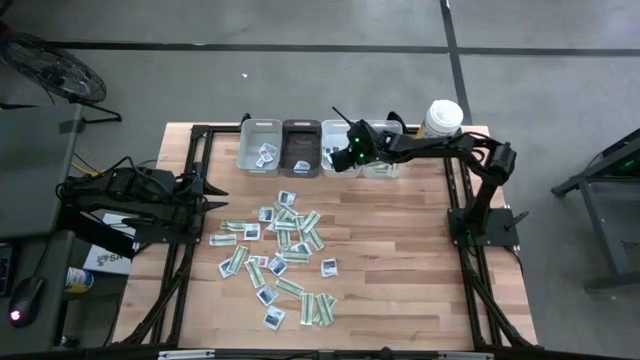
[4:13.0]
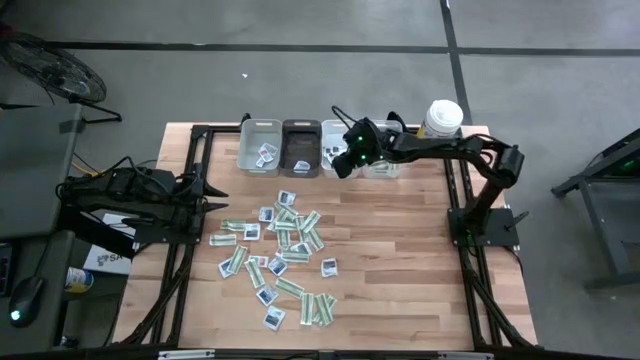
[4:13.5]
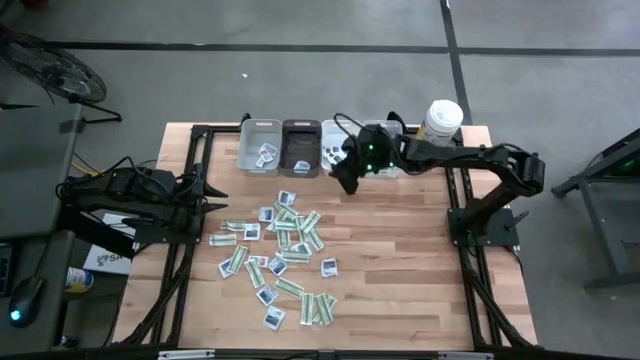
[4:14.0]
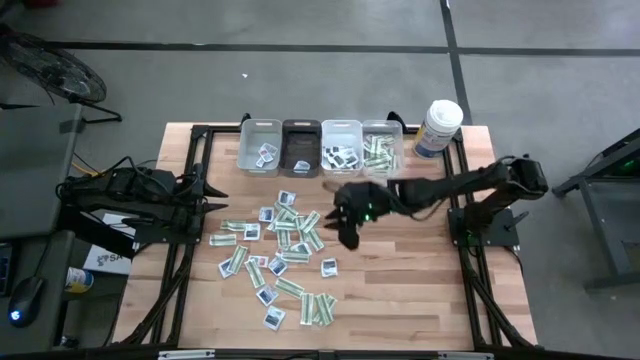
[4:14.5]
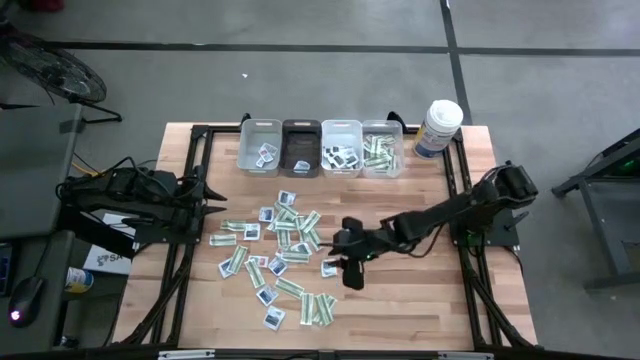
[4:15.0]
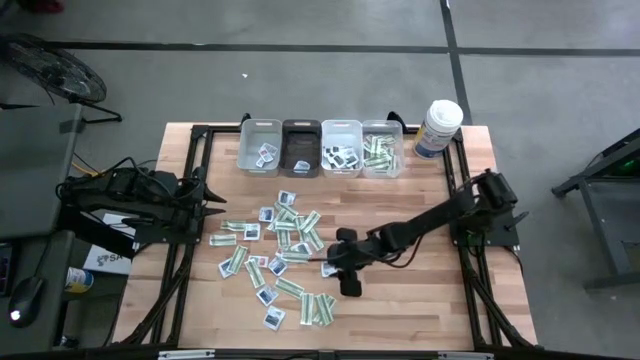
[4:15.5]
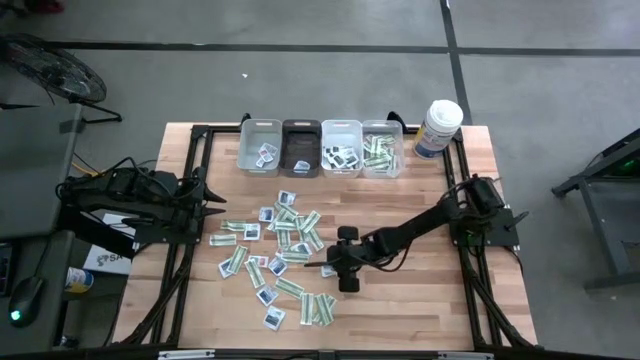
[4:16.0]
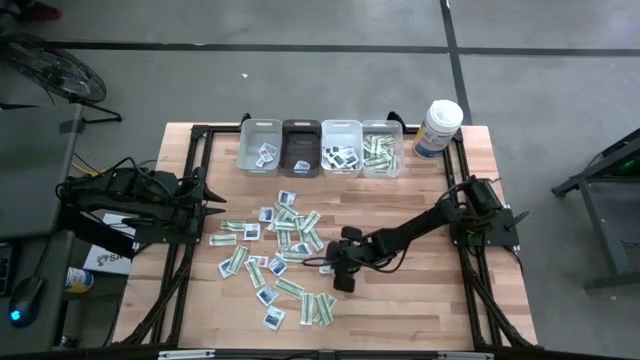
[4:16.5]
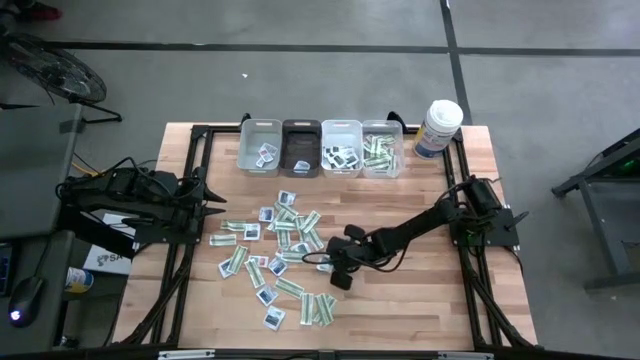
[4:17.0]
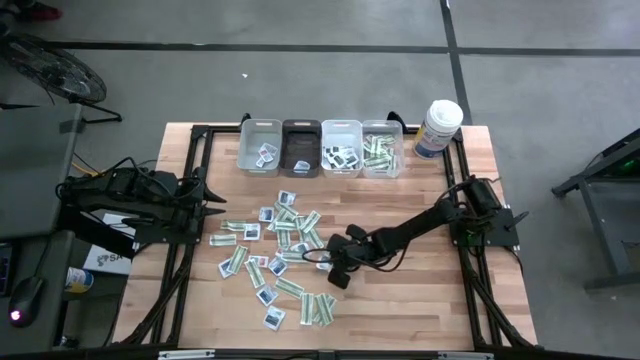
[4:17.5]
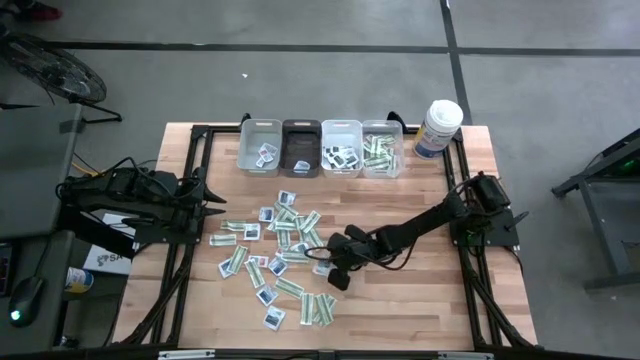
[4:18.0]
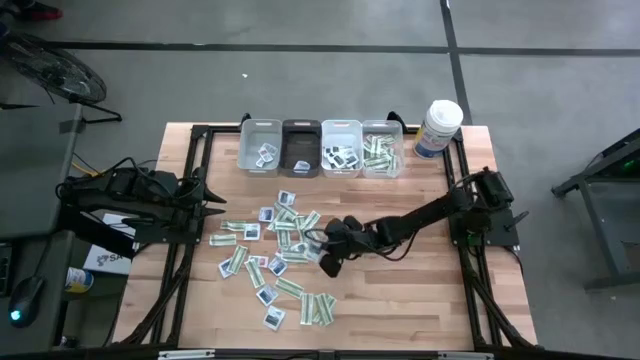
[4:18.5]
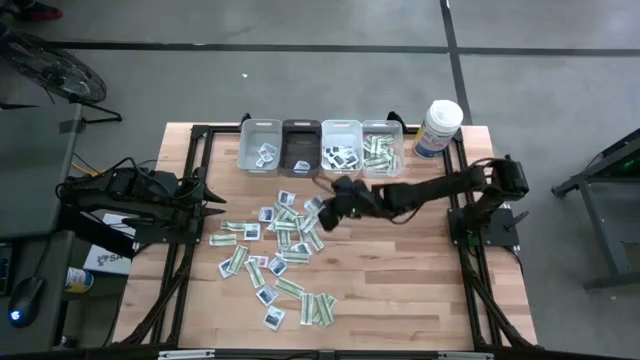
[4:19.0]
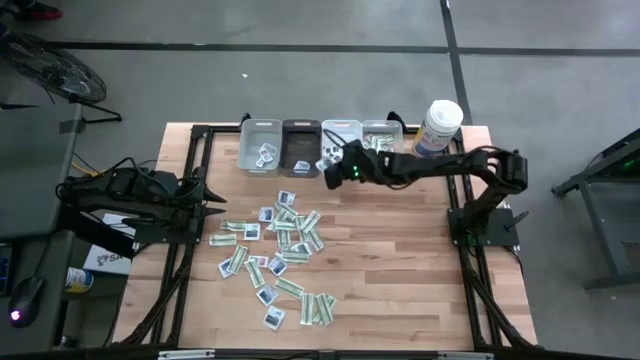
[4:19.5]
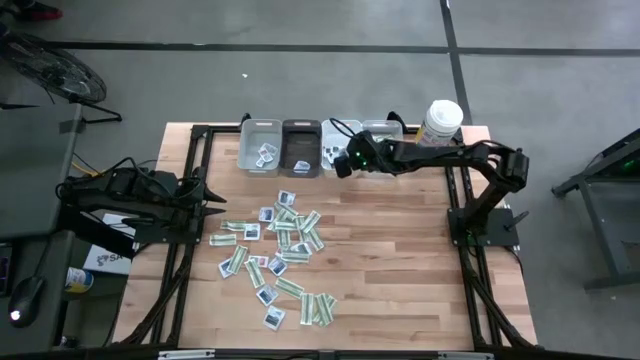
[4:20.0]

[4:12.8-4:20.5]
Task: Pick & Place First Aid Supplies
Put the black towelette pack into the white bin

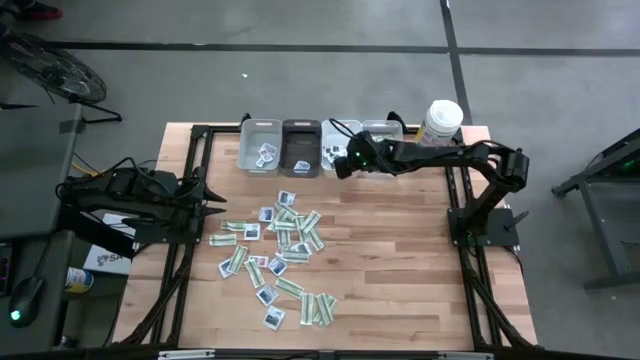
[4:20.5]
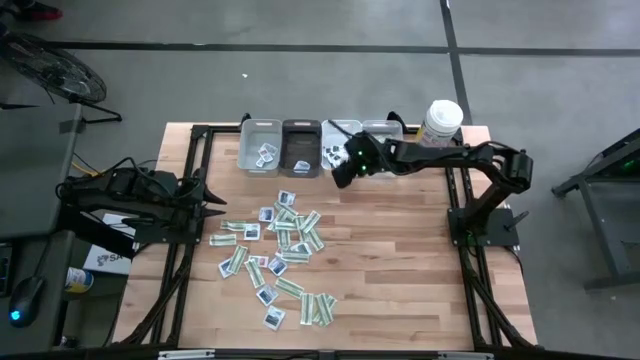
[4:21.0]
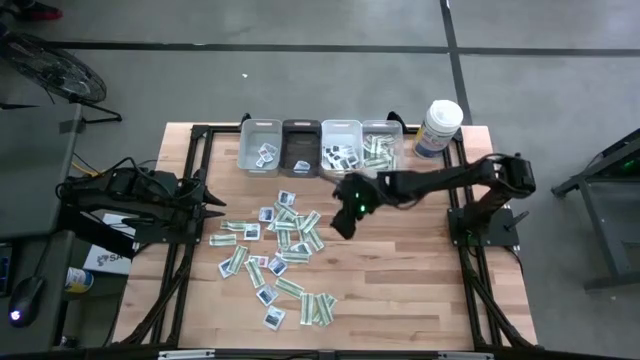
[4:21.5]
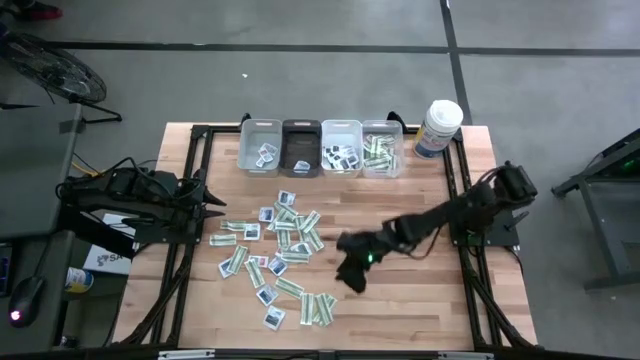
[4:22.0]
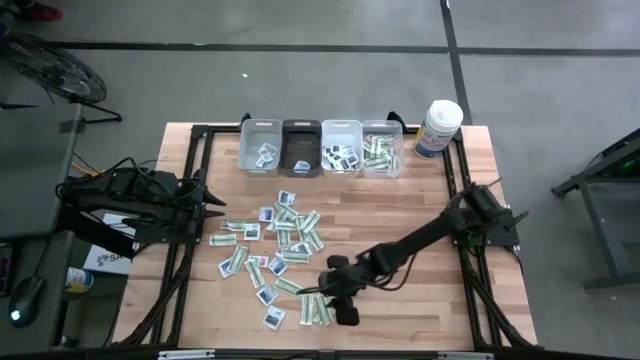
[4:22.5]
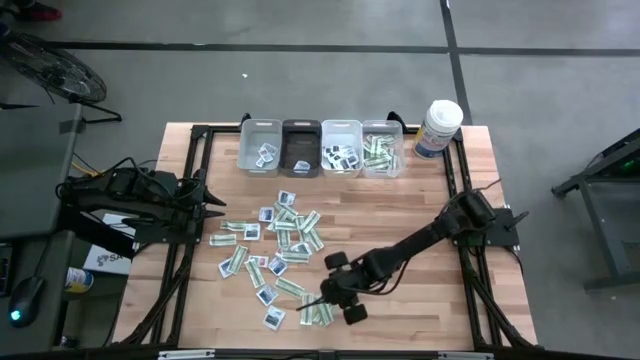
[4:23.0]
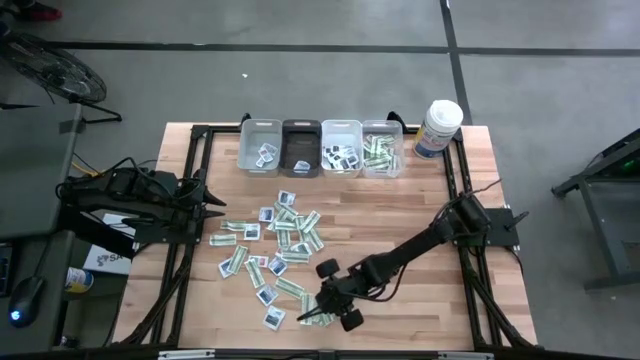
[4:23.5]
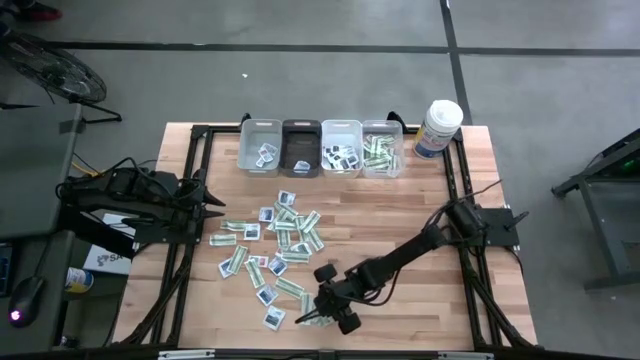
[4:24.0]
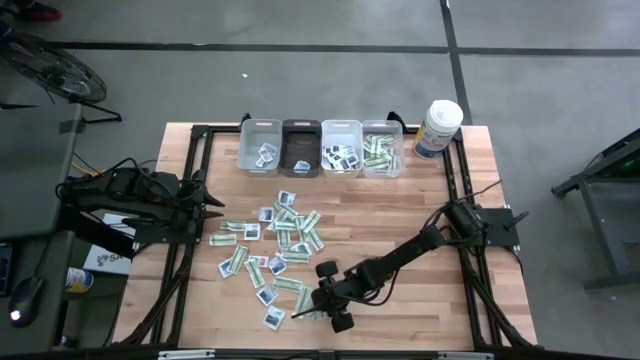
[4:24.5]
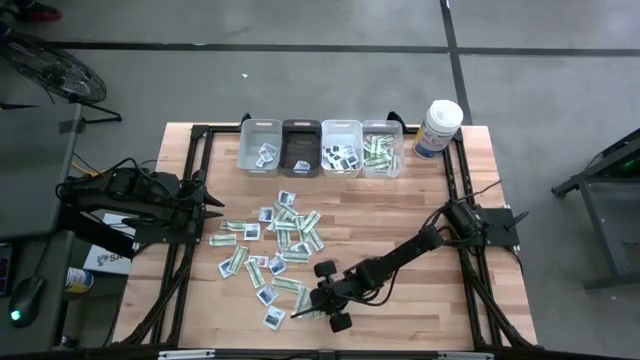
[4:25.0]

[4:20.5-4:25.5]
Put the green bandage into the transparent bin

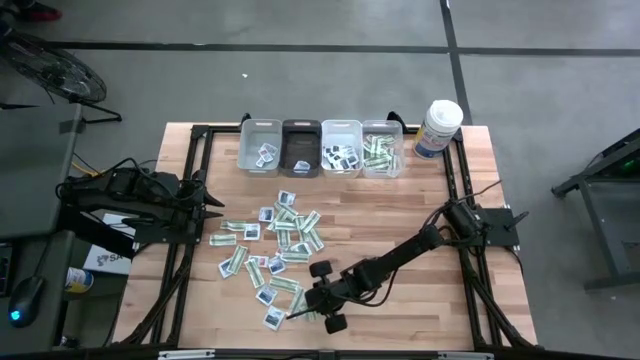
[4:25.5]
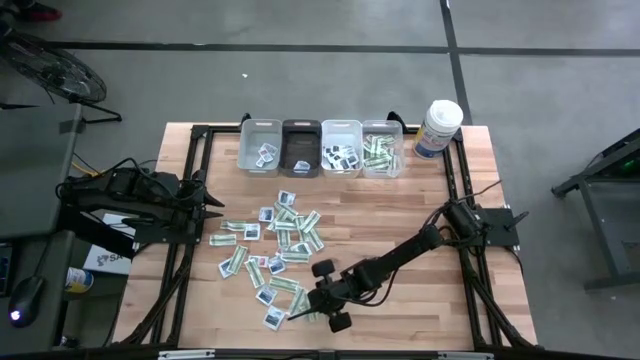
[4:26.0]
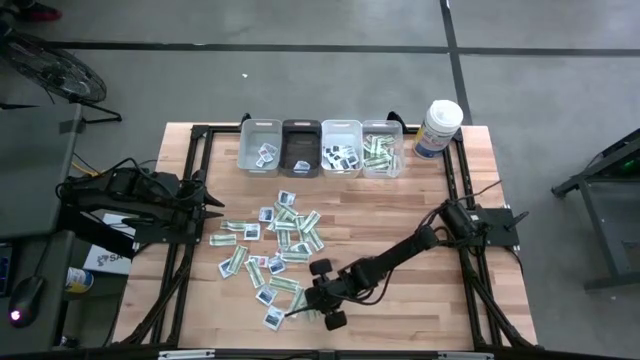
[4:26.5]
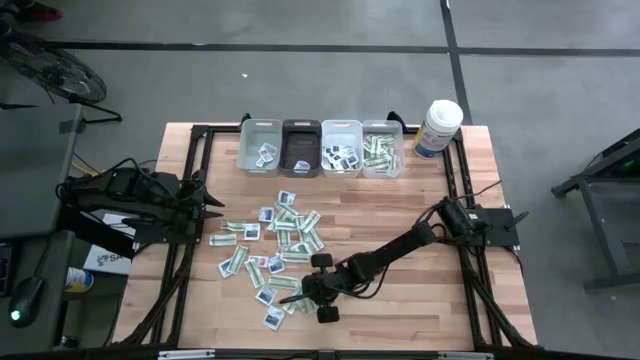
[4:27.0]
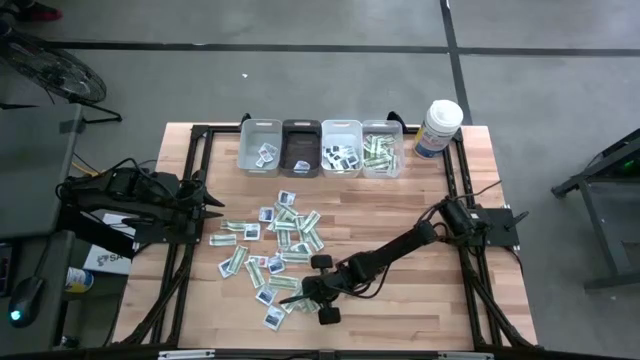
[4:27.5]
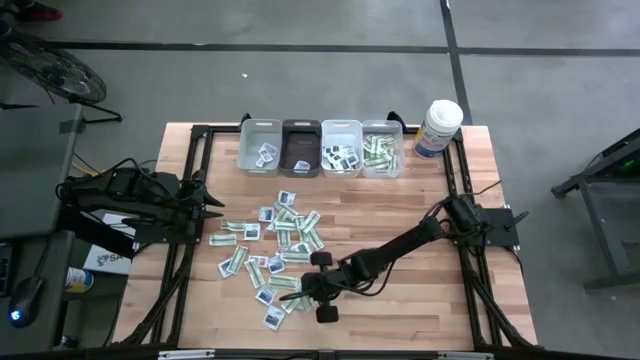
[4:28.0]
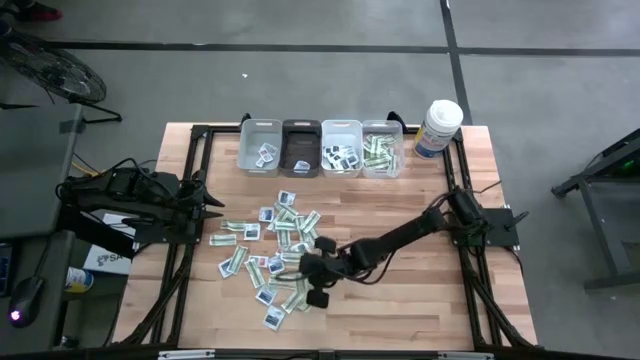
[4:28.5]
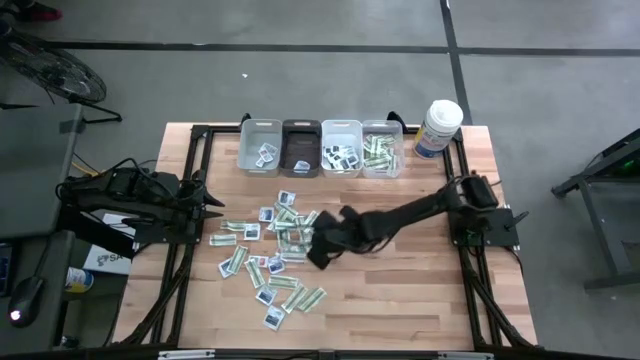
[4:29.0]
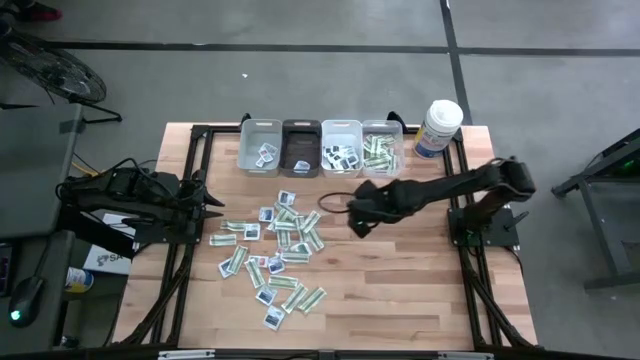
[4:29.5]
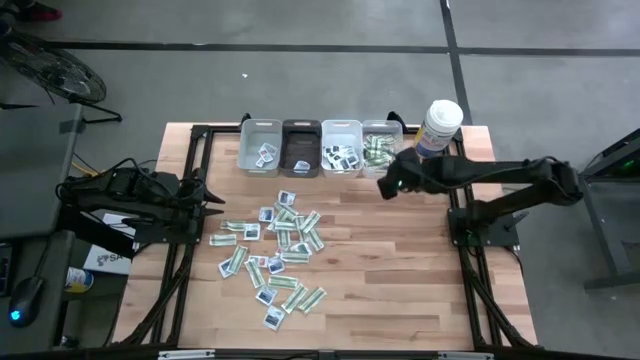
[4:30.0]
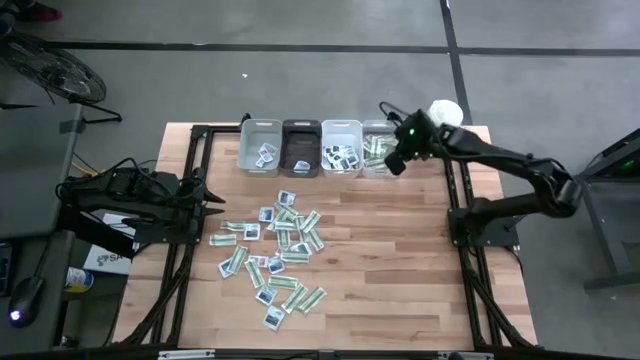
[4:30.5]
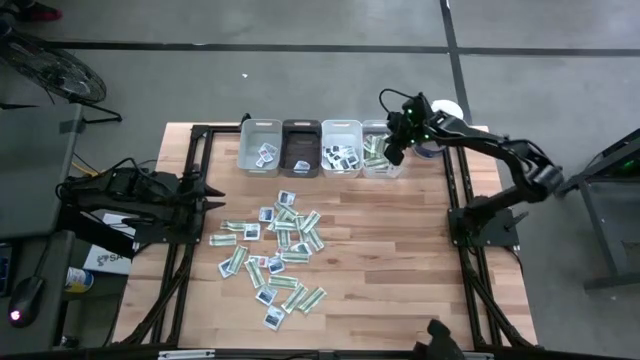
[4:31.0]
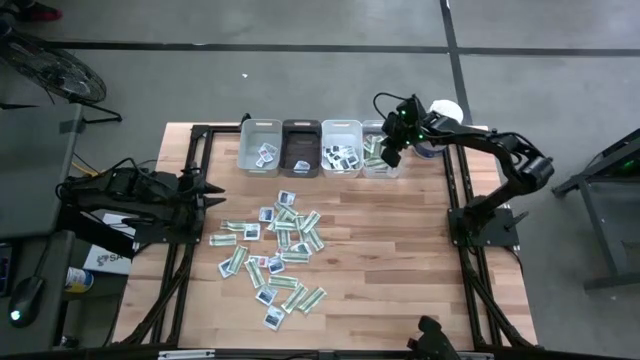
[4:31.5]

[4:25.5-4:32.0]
Put the green bandage into the transparent bin

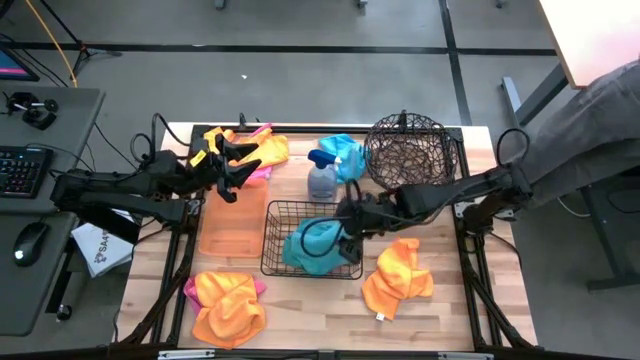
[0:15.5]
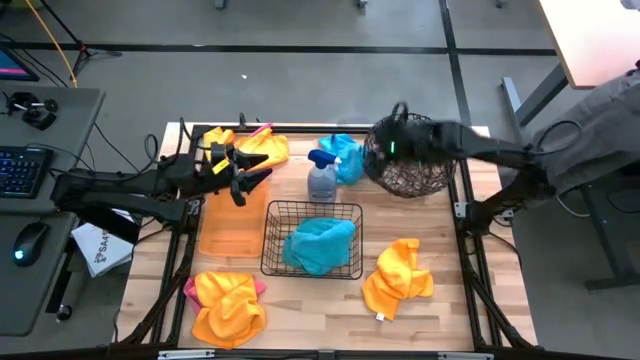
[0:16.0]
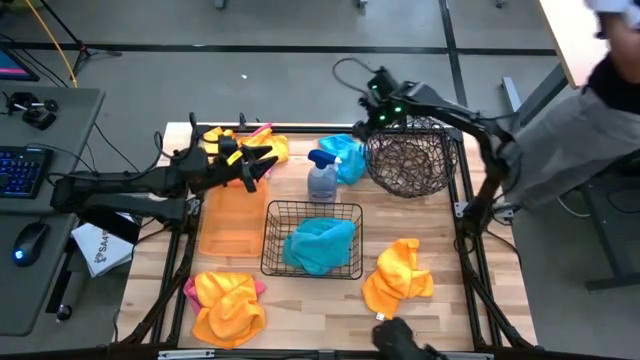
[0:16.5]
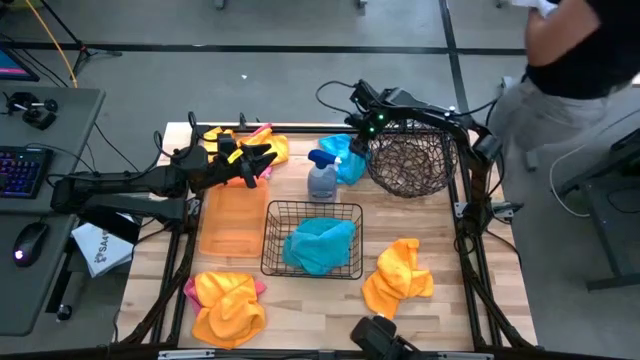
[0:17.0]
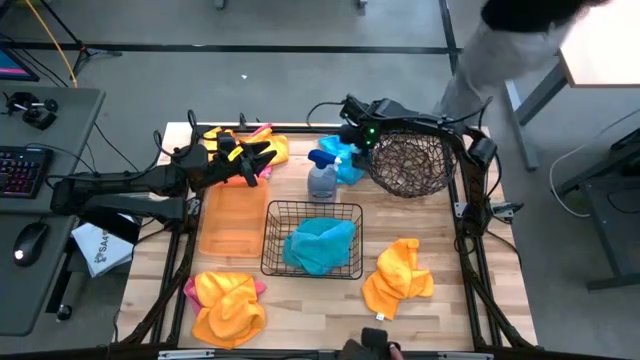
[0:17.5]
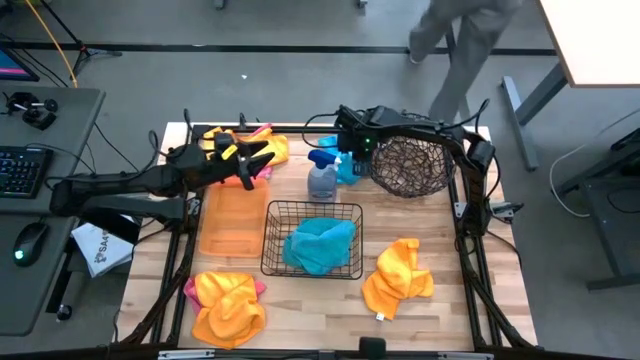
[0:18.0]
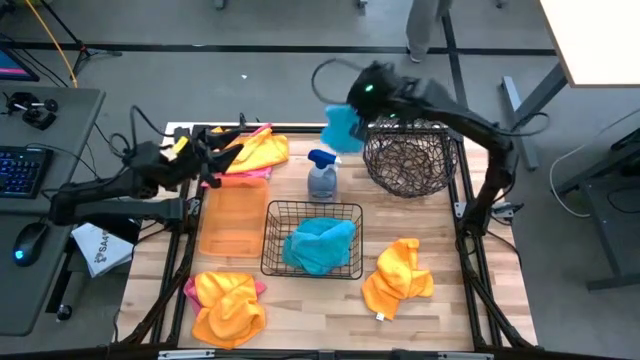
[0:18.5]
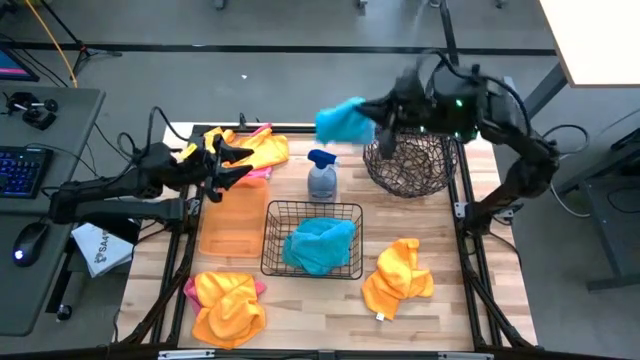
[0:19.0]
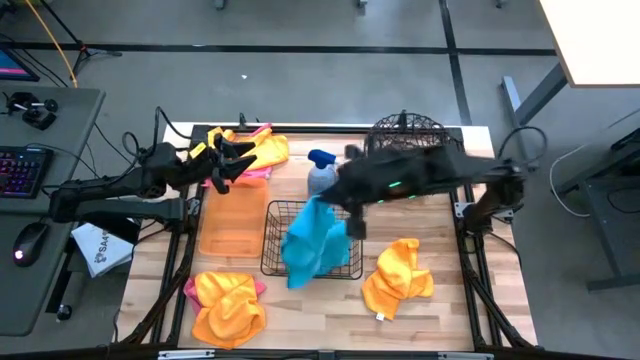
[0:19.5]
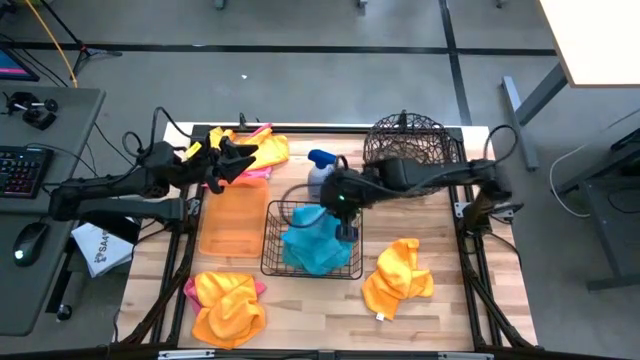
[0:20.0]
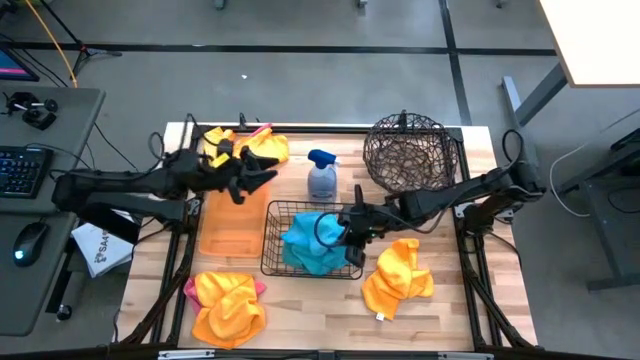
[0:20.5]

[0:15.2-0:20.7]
Task: Sort microfiber towel by color & place in baskets
Put the blue towel into the bottom wire basket
